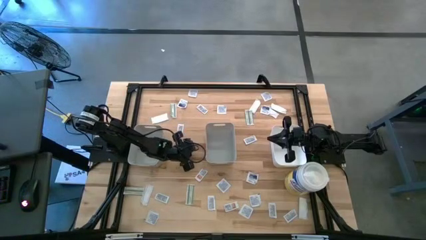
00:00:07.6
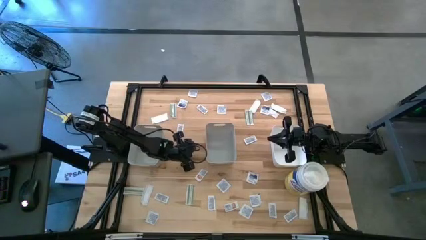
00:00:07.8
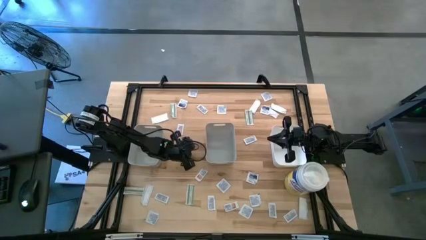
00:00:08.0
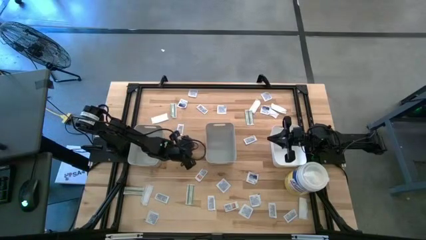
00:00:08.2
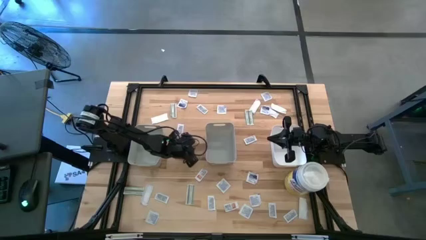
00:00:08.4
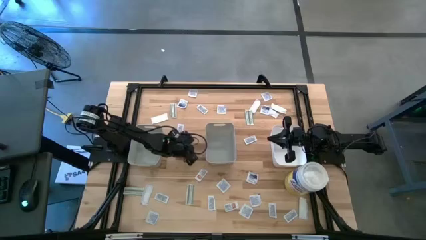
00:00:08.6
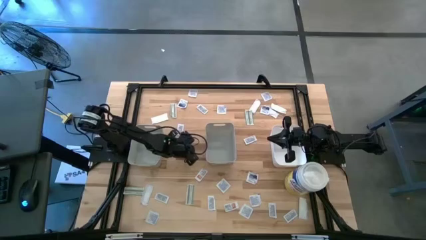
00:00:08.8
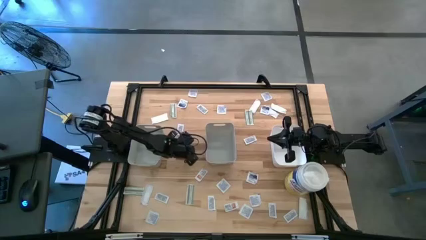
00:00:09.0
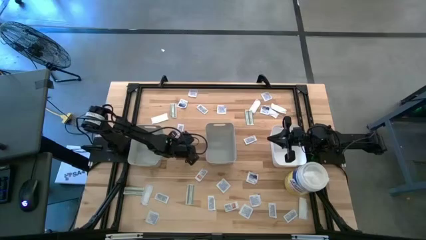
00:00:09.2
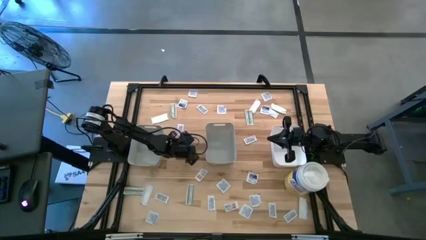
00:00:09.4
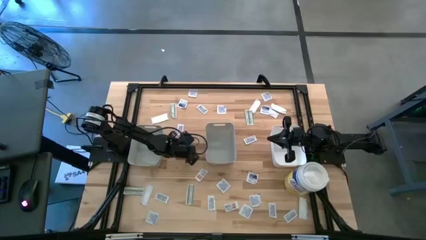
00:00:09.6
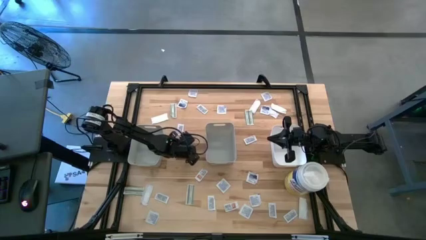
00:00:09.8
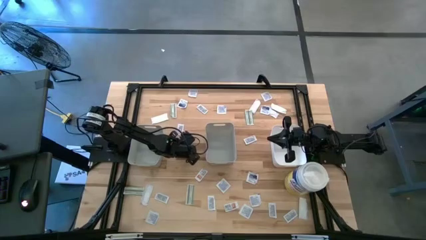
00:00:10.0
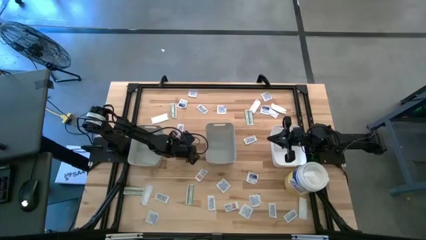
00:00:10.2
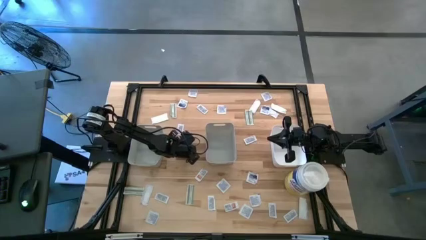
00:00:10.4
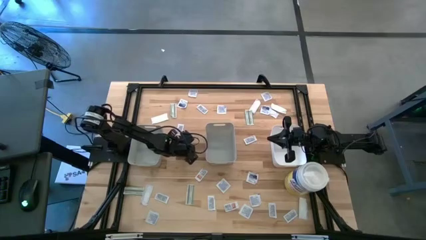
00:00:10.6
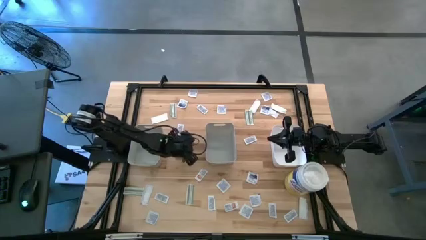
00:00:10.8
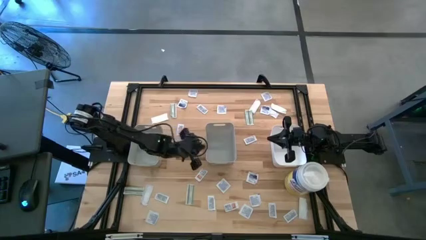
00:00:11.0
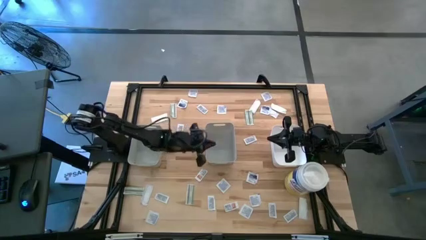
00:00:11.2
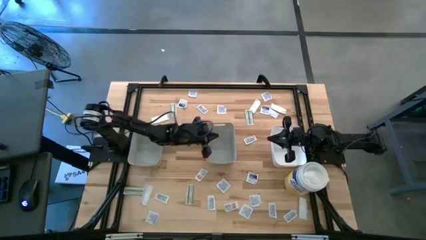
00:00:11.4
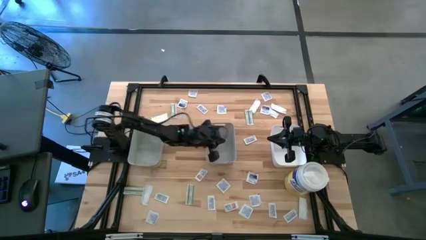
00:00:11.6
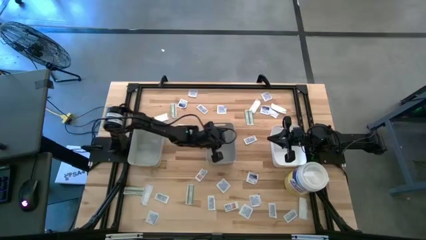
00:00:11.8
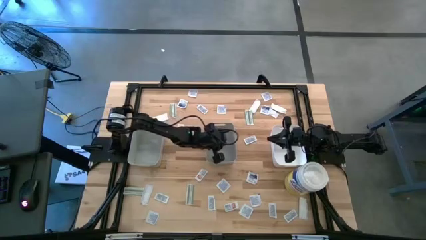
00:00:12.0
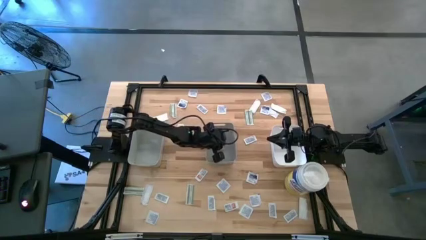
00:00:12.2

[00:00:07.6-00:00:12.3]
Task: Pick & Place First Aid Supplies
Put the ointment pack into the right gray bin

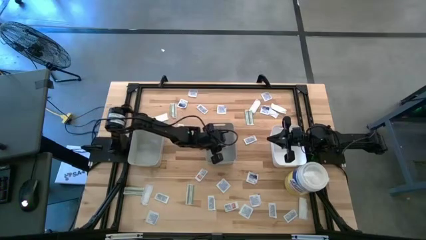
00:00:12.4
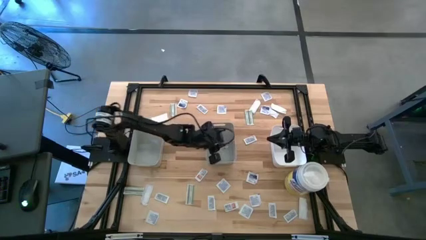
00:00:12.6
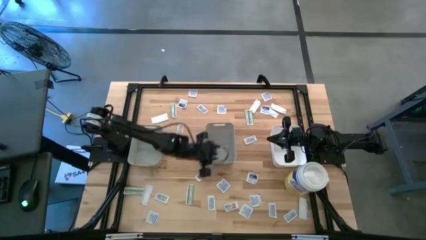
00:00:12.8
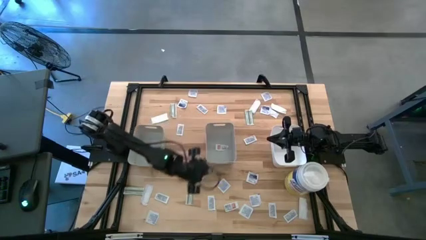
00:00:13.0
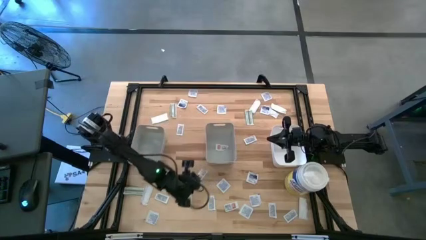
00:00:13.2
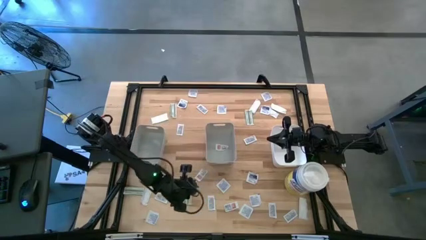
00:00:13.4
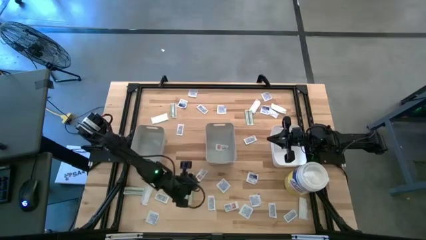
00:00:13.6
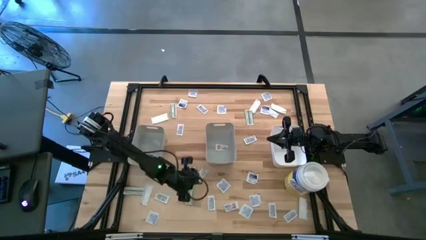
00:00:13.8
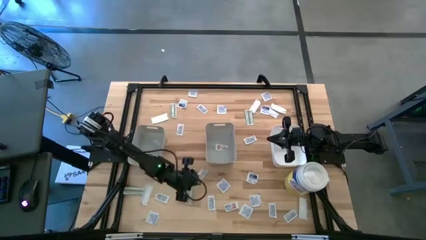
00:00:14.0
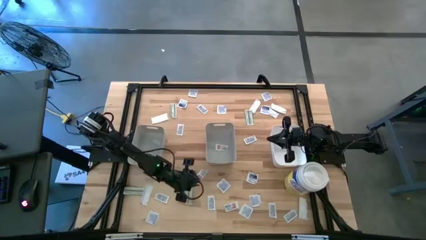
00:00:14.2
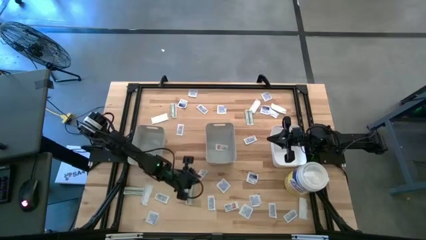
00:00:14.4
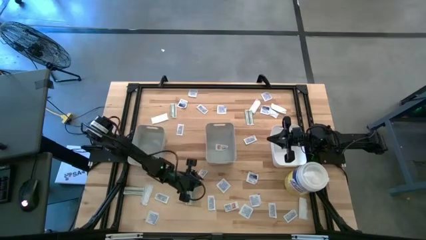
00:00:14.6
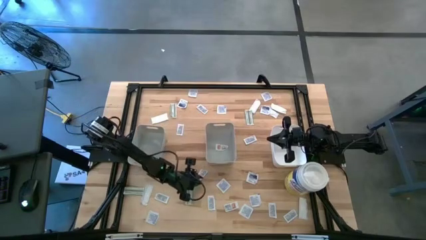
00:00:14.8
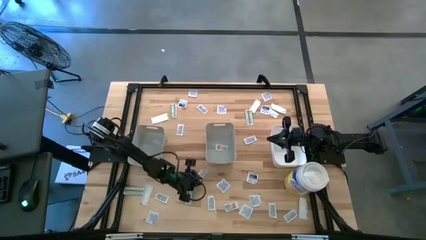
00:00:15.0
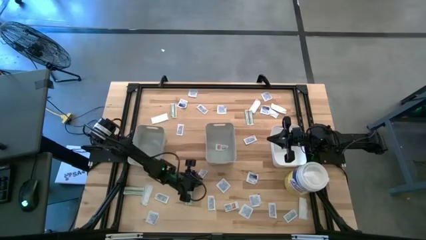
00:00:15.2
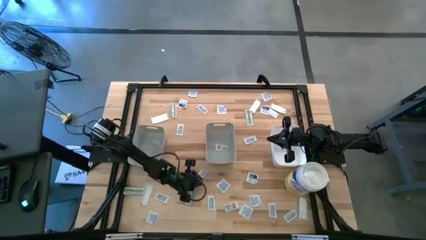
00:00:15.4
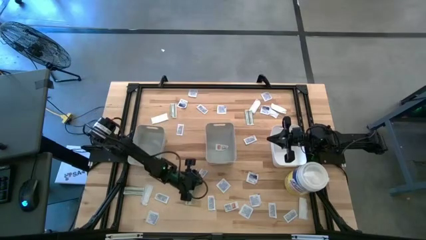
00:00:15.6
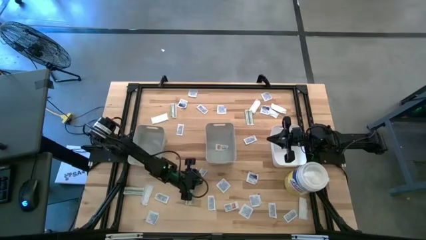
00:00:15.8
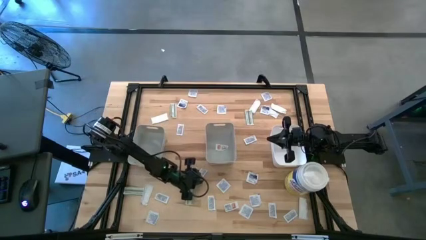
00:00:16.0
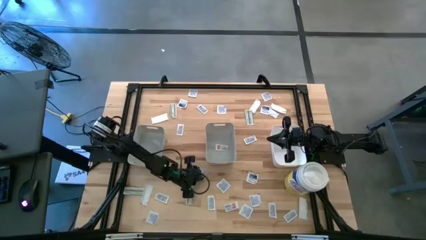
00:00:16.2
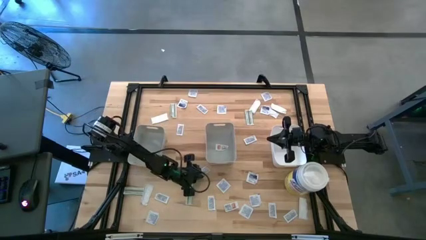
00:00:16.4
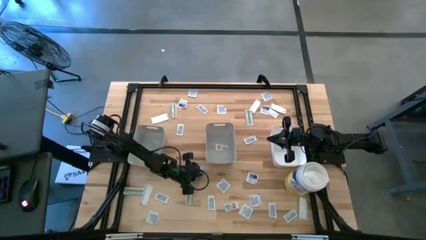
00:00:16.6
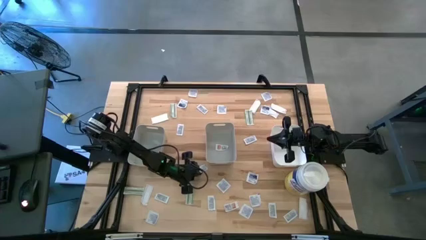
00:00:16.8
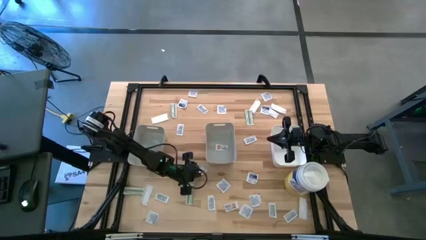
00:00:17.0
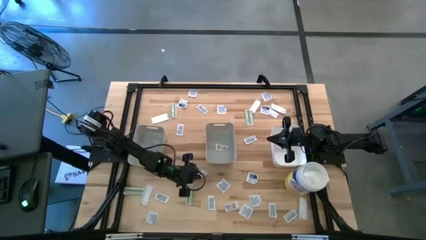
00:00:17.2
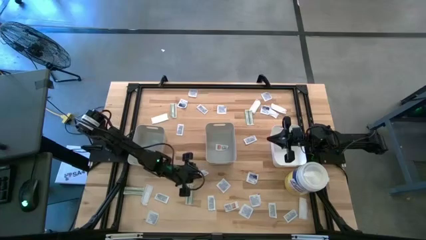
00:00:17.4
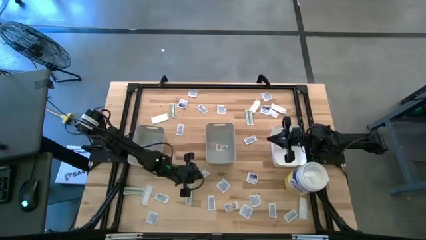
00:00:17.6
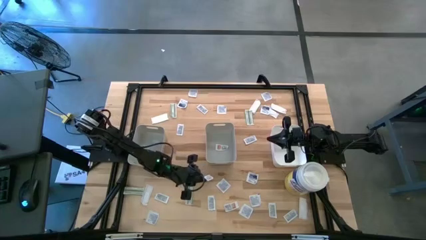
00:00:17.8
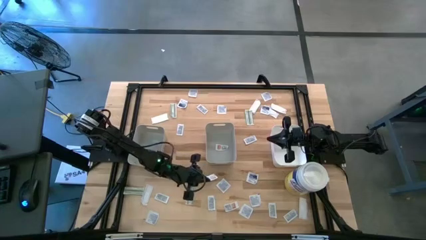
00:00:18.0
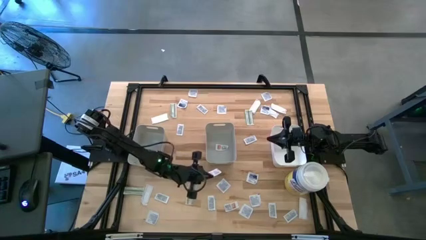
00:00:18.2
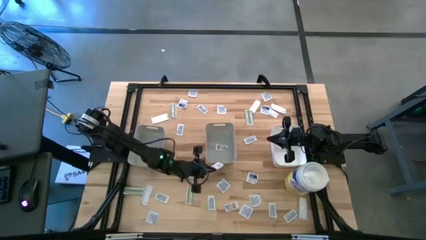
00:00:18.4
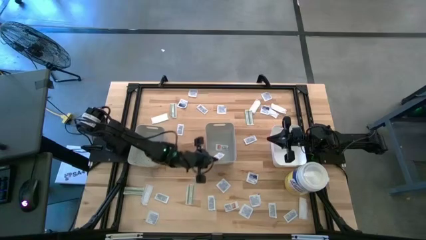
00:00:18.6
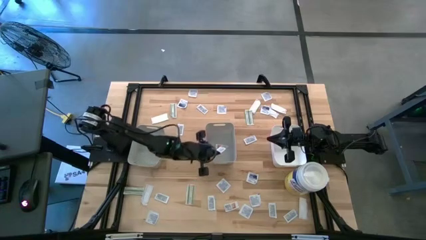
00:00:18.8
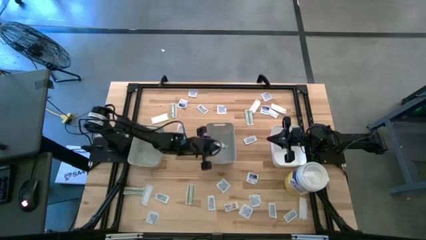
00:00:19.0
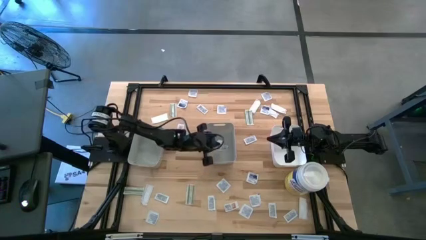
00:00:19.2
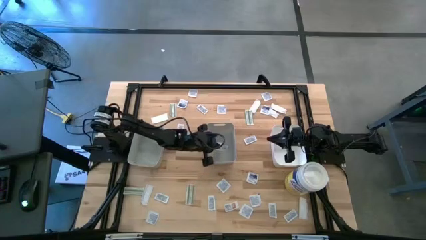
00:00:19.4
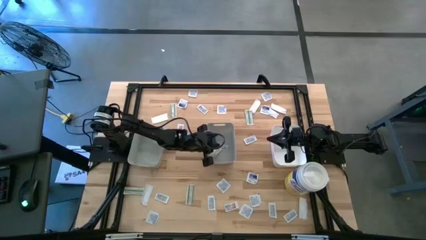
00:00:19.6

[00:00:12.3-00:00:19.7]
Put the ointment pack into the right gray bin

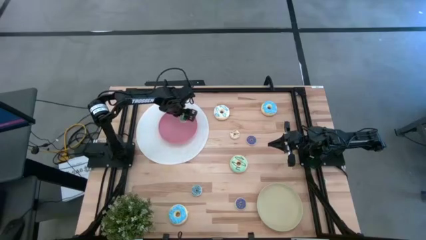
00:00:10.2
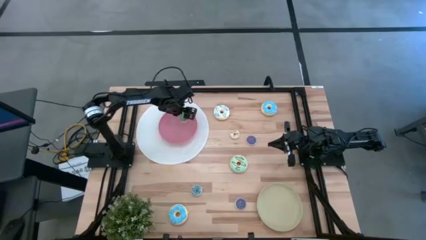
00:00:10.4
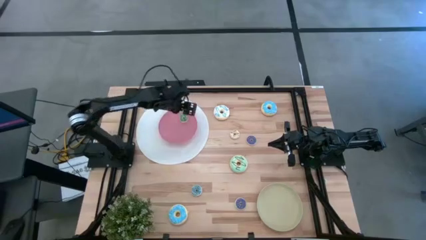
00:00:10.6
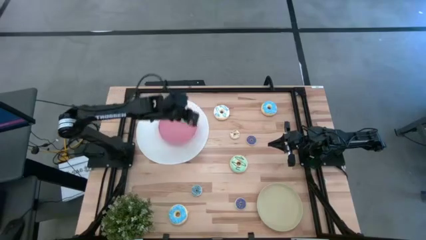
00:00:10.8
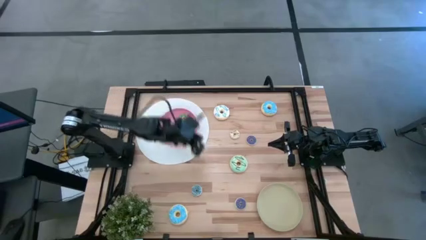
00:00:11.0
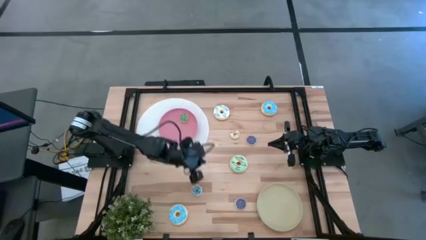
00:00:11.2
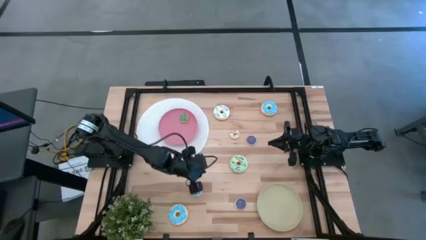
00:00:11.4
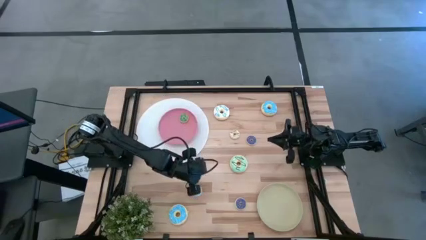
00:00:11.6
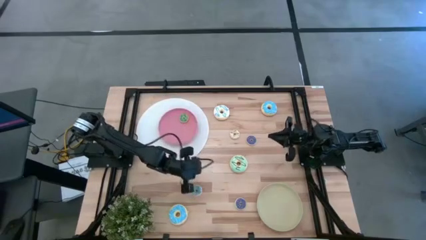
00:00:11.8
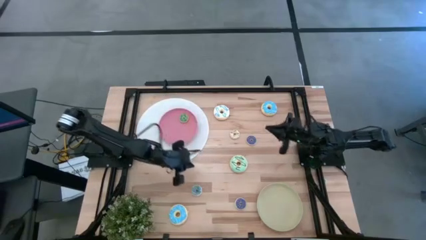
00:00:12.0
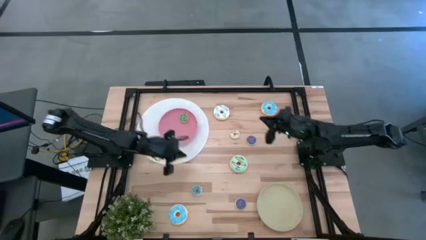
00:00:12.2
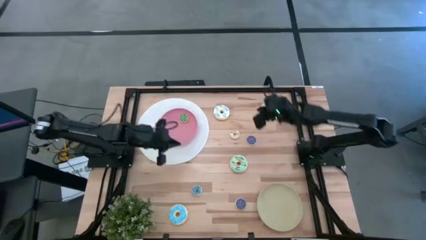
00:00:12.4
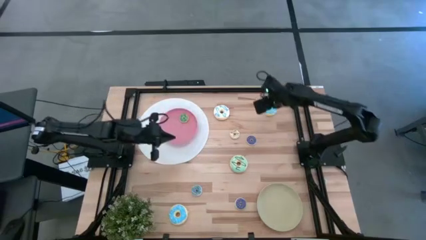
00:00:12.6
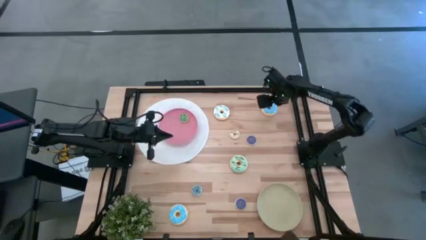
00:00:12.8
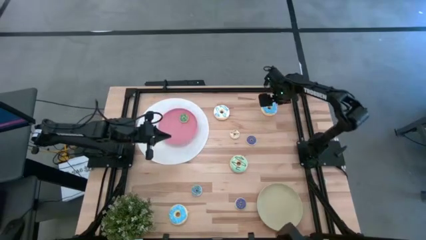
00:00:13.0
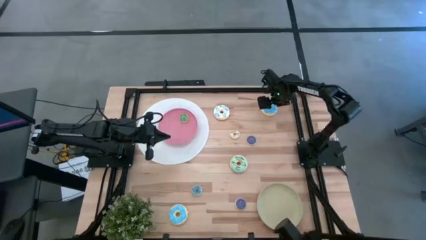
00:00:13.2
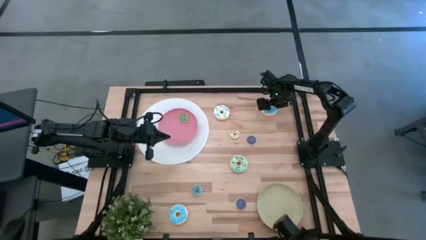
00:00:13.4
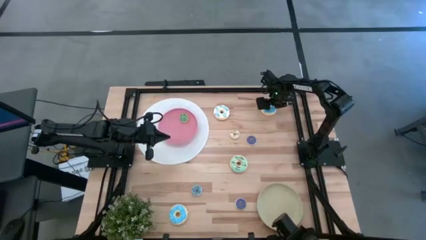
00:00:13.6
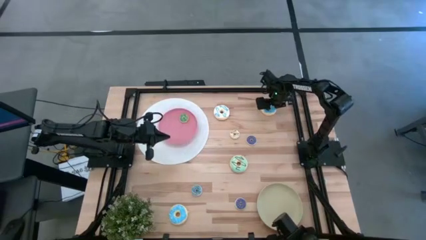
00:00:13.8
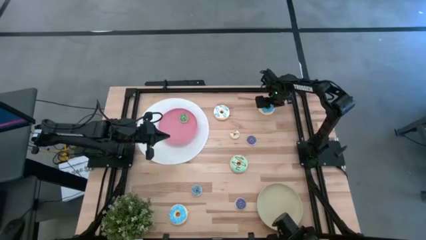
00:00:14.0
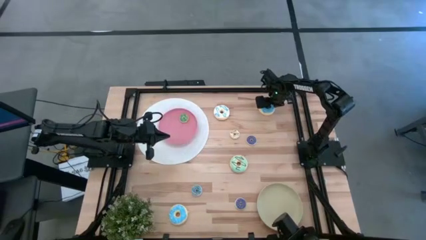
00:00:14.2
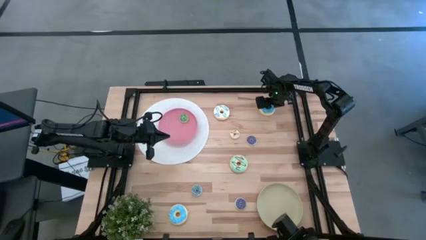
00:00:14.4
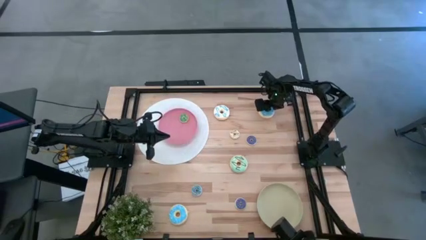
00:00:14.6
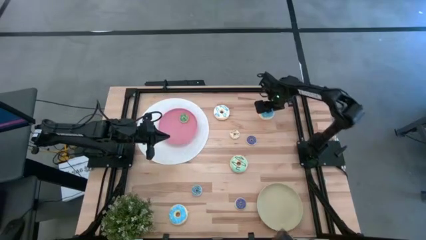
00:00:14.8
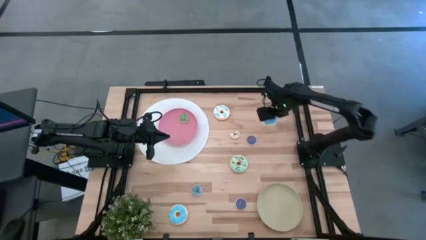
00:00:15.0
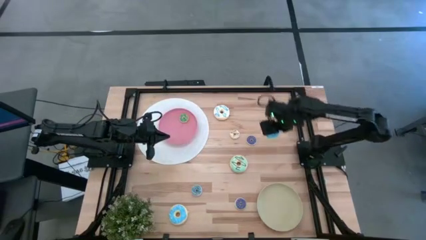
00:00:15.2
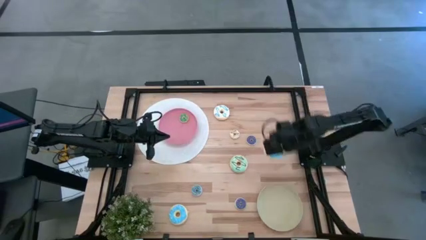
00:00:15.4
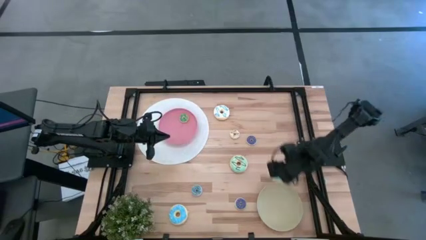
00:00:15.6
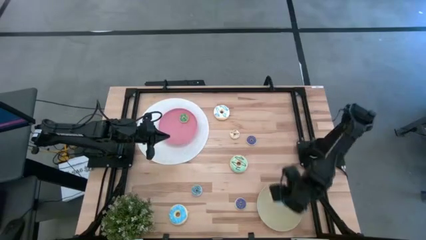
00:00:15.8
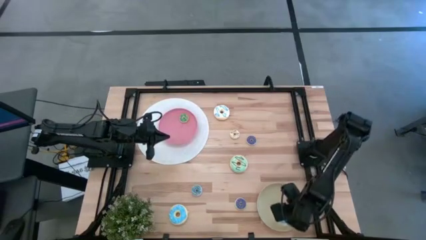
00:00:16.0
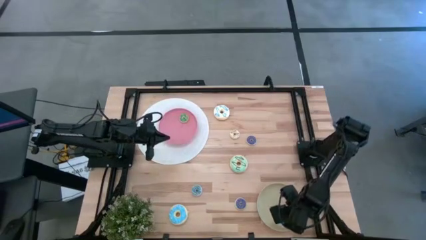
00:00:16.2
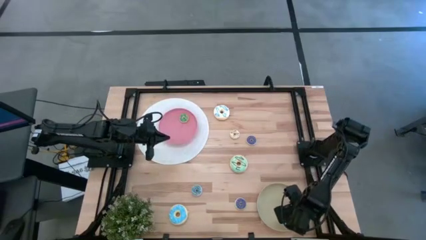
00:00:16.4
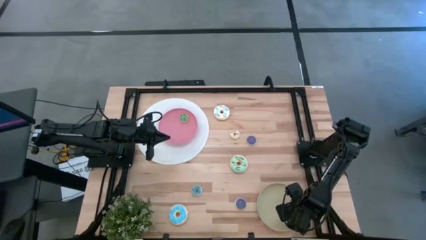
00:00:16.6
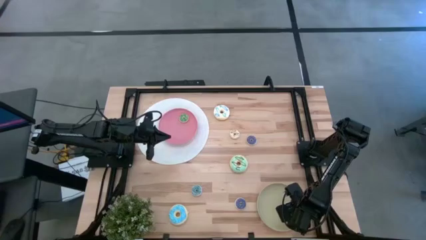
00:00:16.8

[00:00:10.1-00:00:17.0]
Task: Pick & Place donuts
Put the large blue donut on the brown plate
